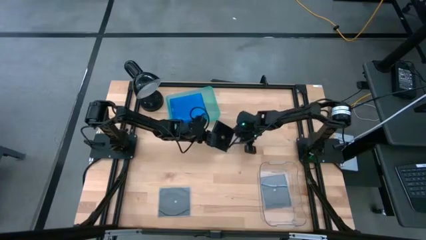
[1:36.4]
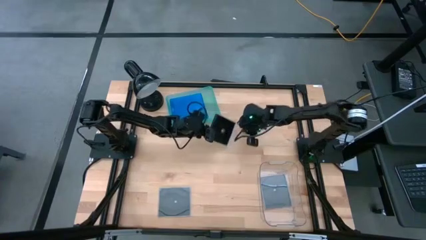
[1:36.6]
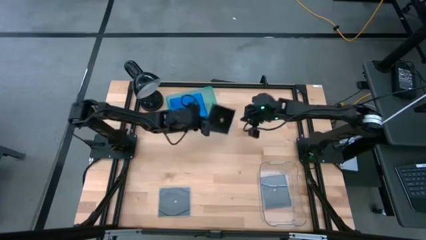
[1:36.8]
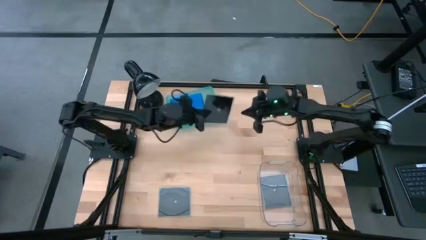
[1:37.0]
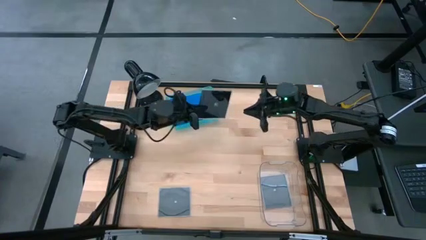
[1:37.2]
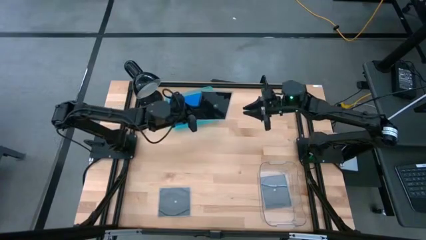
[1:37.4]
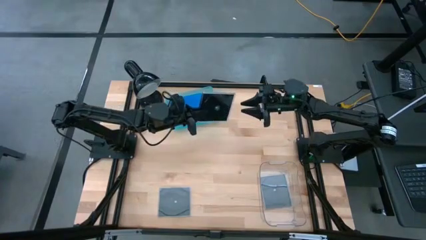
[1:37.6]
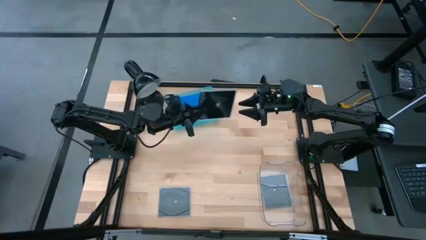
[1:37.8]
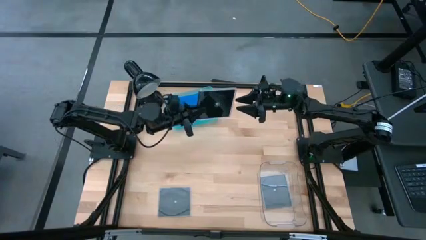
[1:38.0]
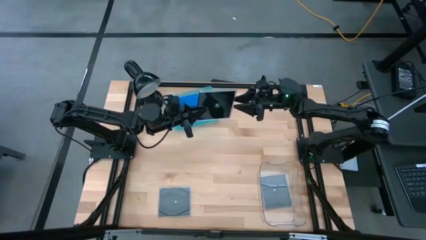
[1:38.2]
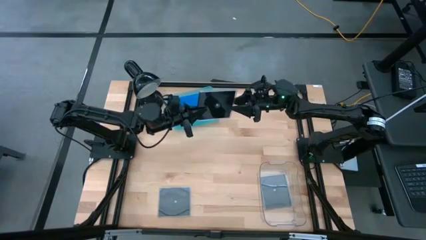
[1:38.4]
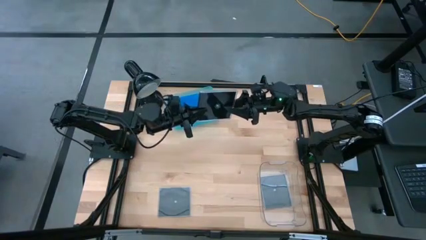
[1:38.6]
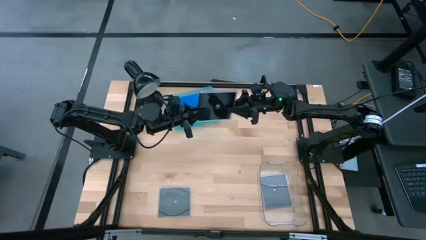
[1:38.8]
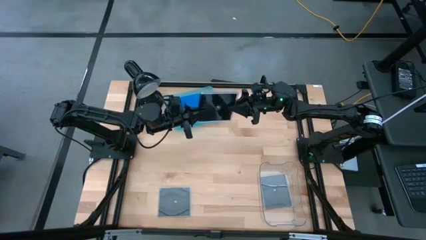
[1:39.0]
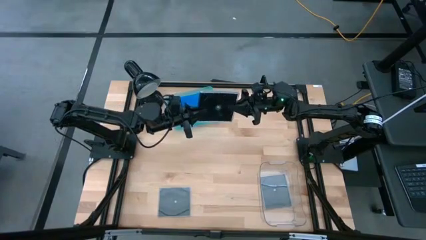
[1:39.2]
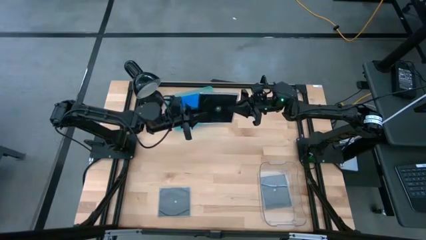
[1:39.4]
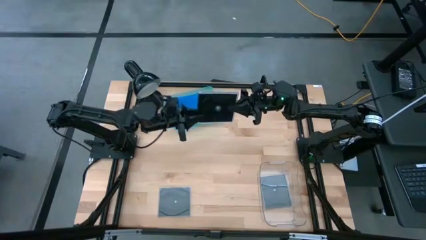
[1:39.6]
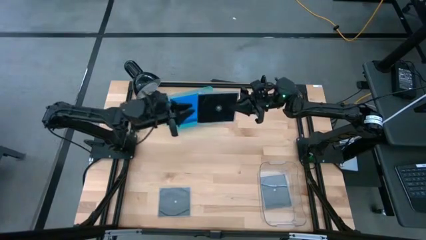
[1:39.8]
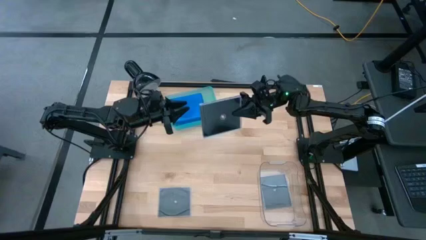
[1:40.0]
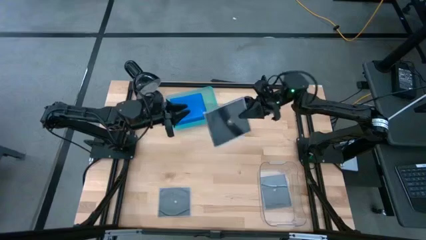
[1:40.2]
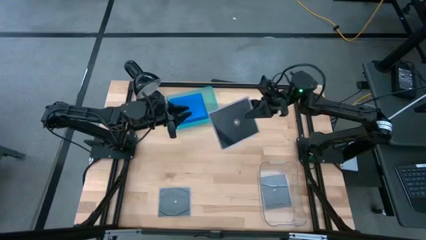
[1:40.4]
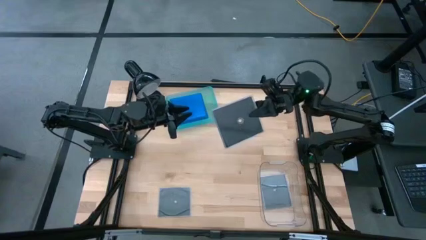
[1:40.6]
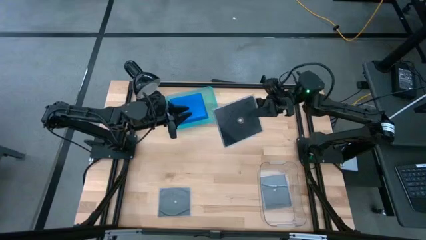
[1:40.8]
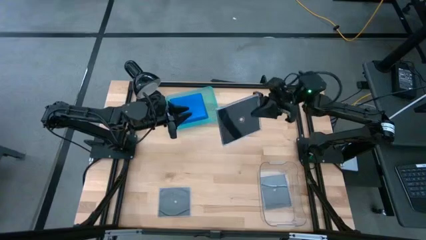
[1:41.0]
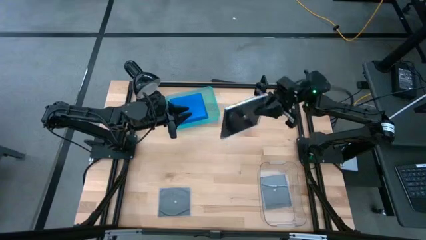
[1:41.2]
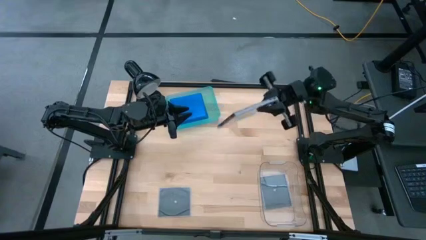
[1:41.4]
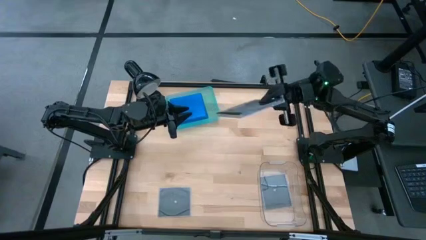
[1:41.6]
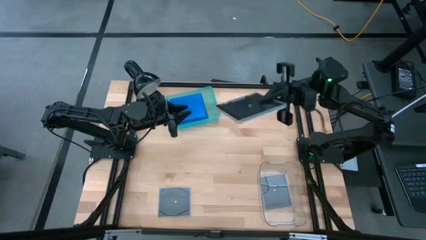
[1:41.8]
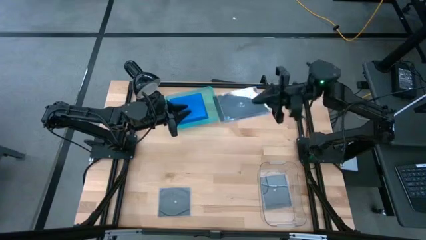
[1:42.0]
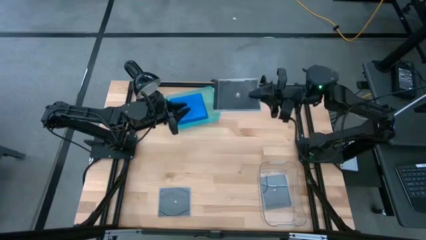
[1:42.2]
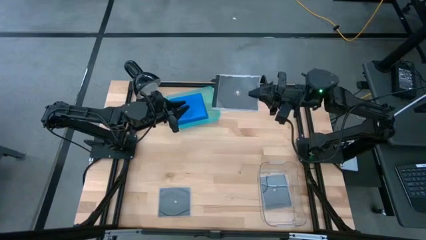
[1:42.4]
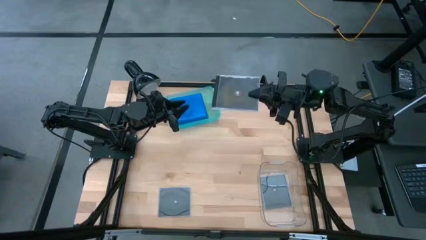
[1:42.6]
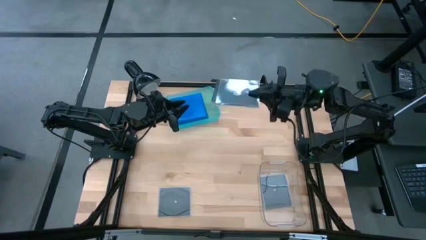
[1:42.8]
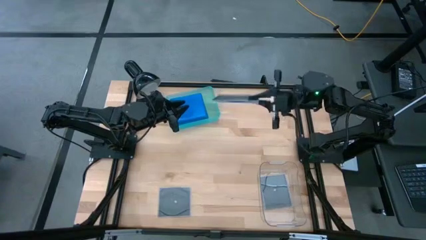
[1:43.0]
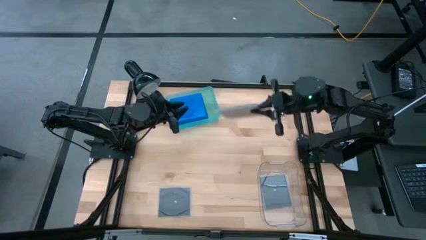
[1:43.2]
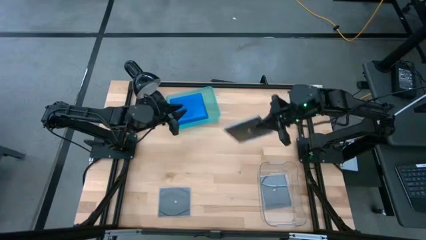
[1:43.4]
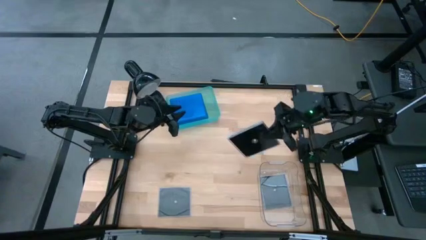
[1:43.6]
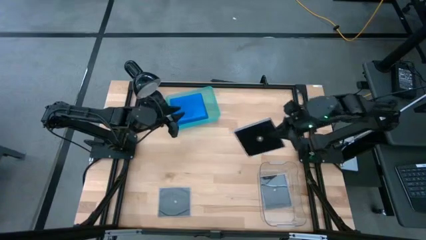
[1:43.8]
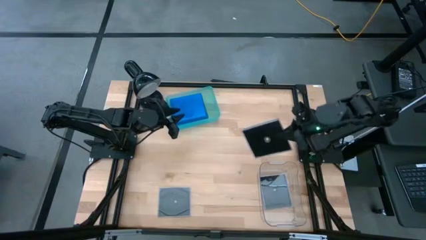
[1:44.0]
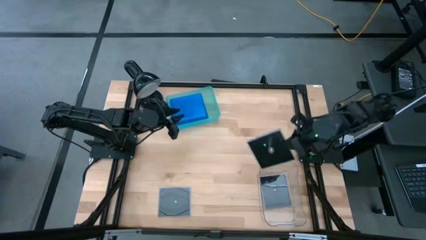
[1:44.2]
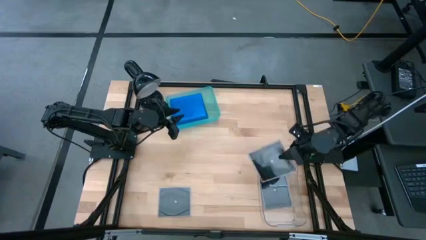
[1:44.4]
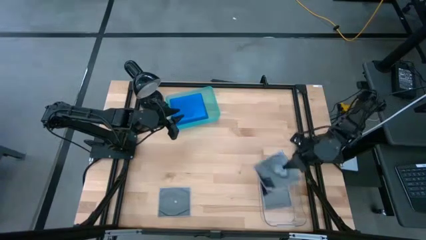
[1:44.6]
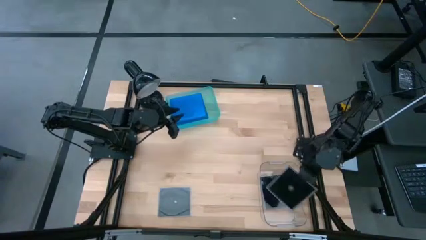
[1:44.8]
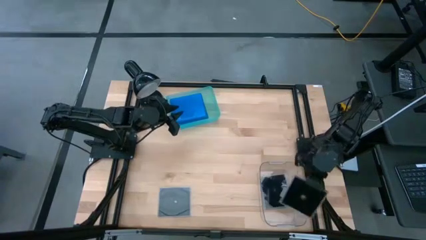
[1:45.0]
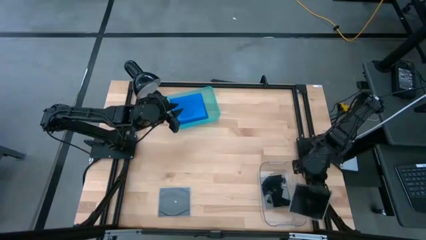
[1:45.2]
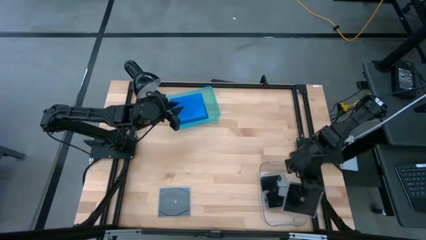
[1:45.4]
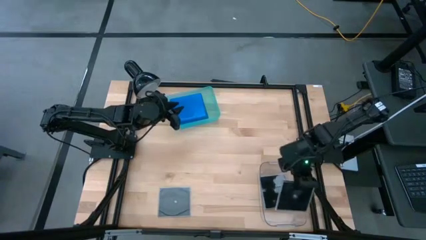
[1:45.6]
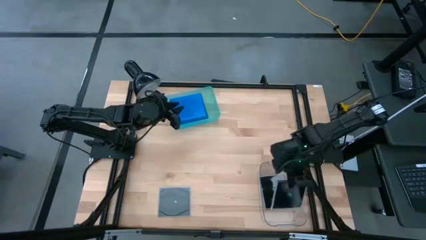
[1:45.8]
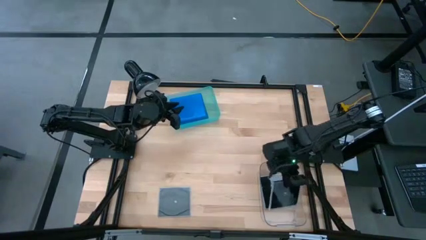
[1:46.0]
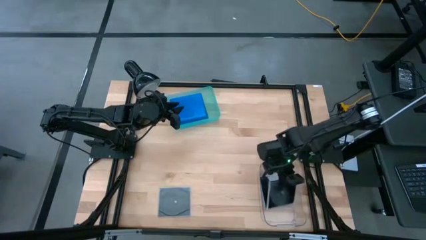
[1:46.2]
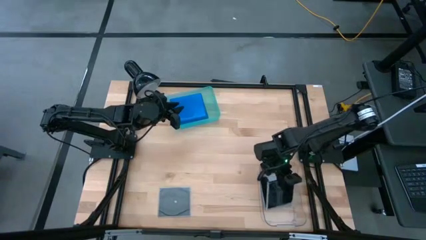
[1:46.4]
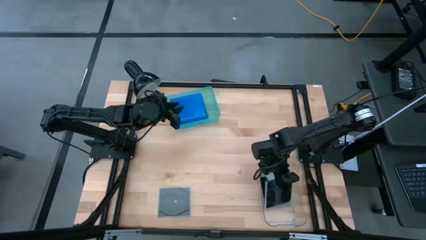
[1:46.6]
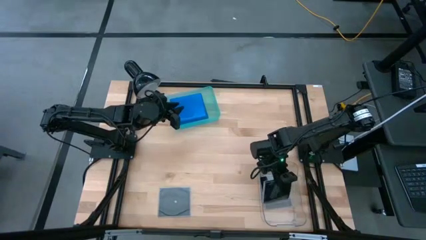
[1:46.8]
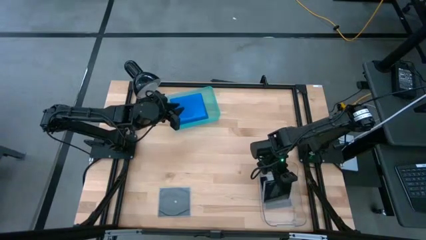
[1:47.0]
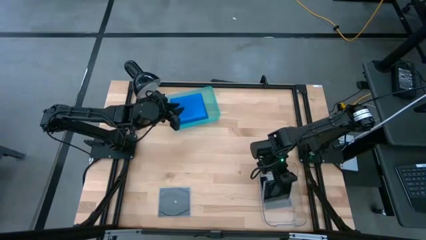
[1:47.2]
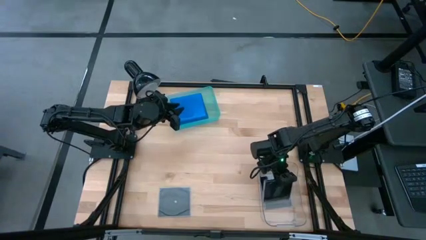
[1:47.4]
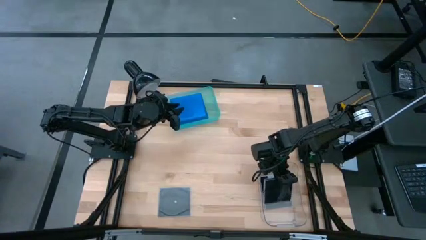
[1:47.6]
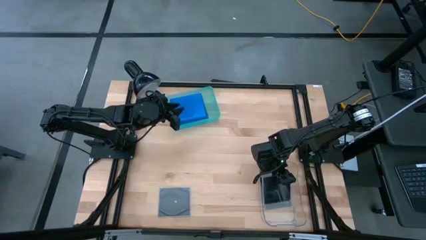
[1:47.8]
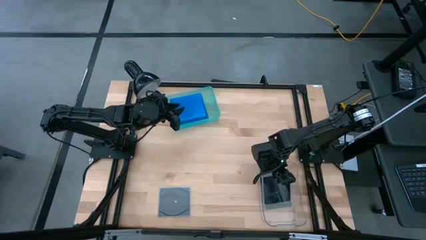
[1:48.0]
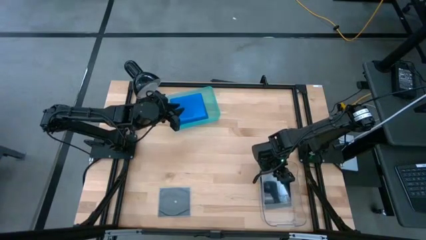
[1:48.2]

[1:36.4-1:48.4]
Task: Pick & place jewel cases by type
Put the right black CD case into the transparent bin

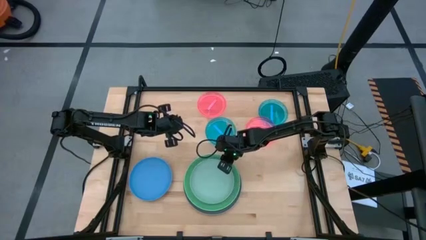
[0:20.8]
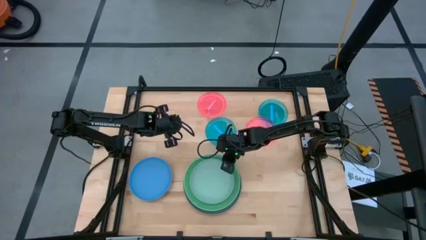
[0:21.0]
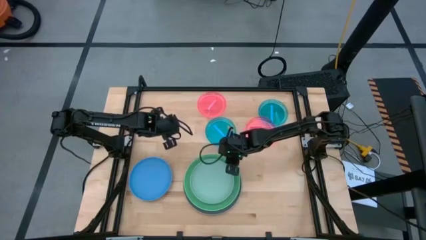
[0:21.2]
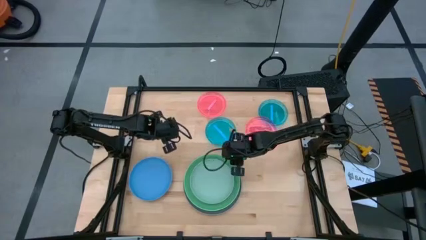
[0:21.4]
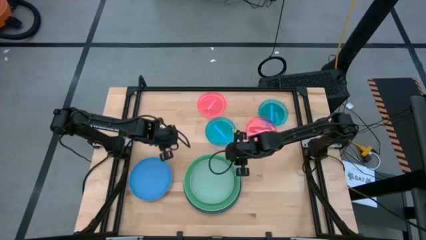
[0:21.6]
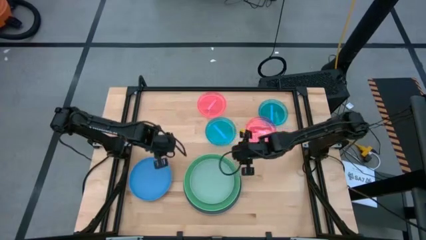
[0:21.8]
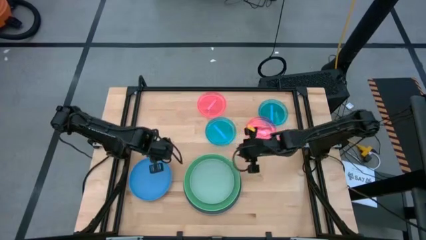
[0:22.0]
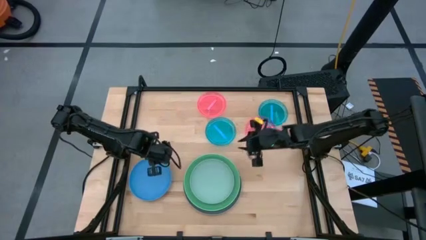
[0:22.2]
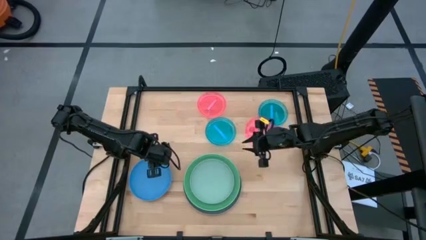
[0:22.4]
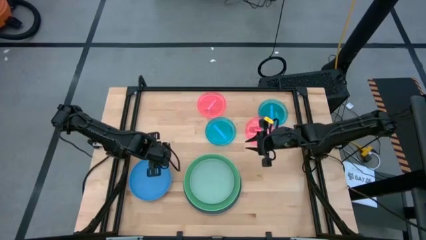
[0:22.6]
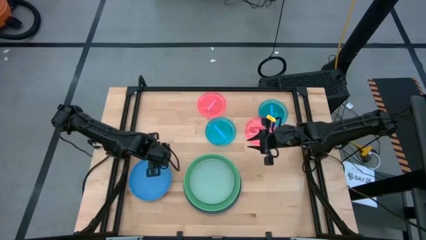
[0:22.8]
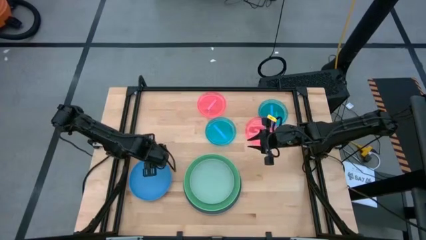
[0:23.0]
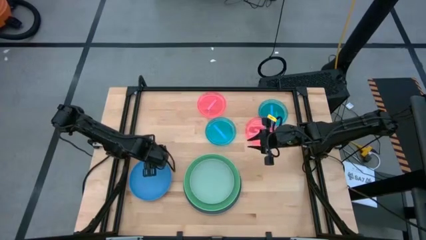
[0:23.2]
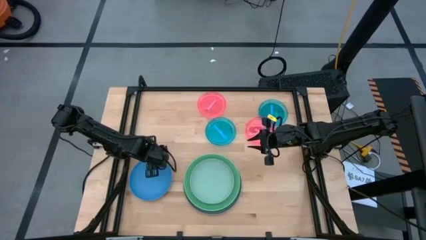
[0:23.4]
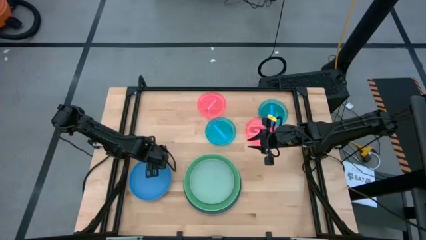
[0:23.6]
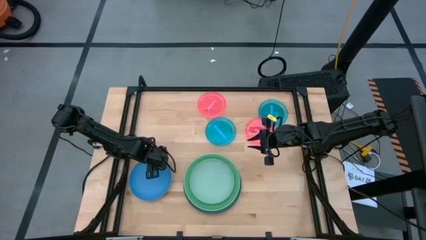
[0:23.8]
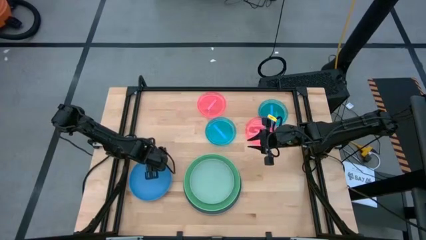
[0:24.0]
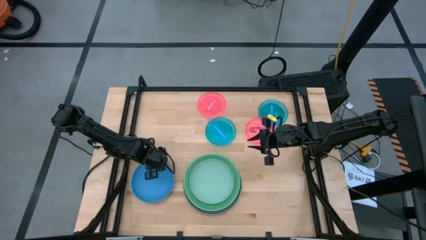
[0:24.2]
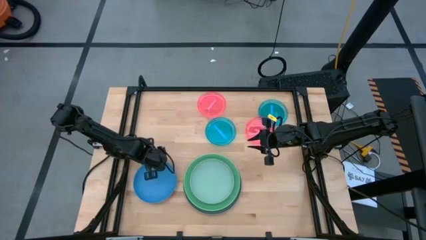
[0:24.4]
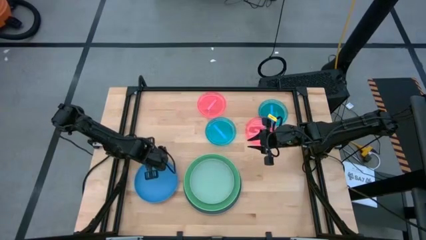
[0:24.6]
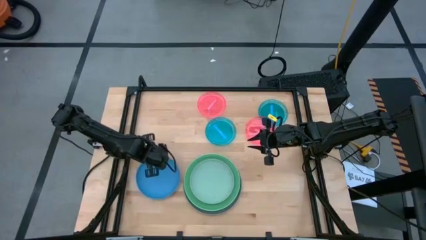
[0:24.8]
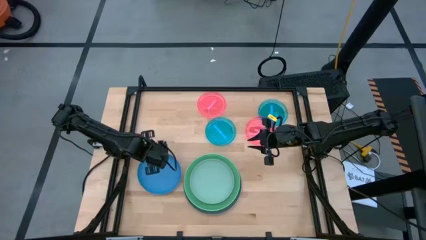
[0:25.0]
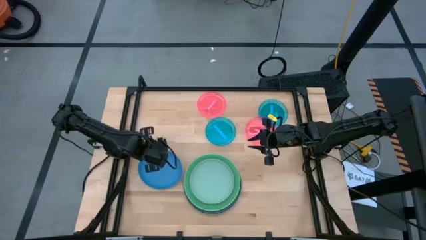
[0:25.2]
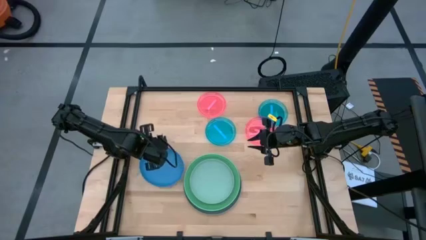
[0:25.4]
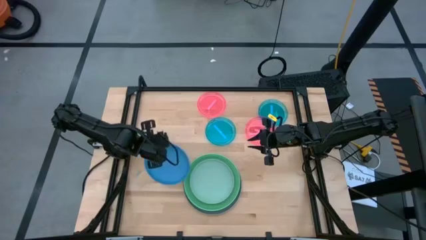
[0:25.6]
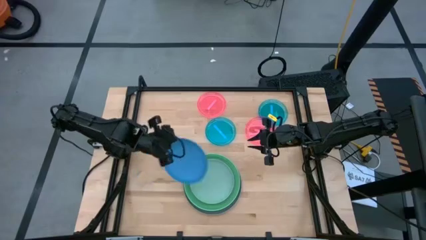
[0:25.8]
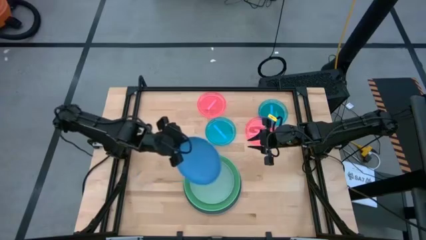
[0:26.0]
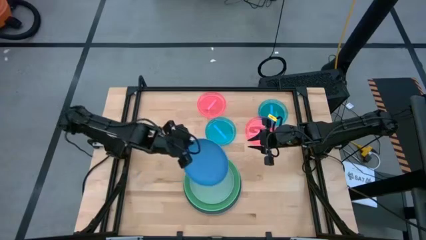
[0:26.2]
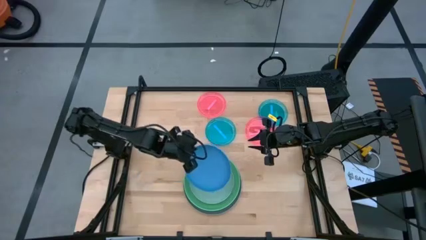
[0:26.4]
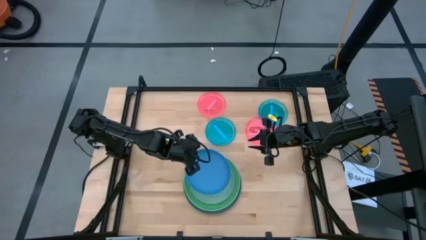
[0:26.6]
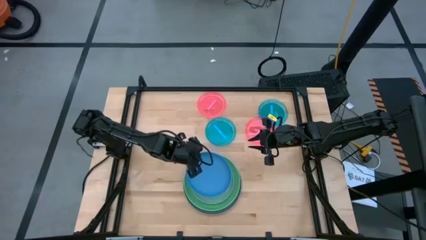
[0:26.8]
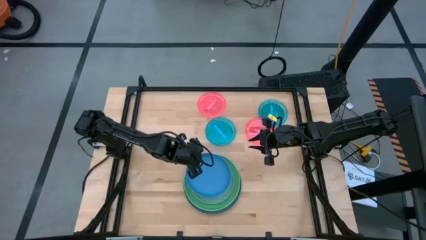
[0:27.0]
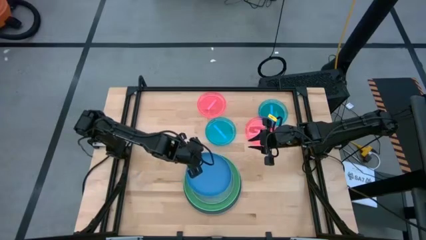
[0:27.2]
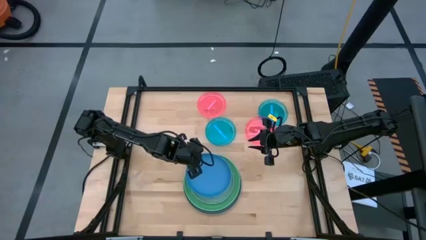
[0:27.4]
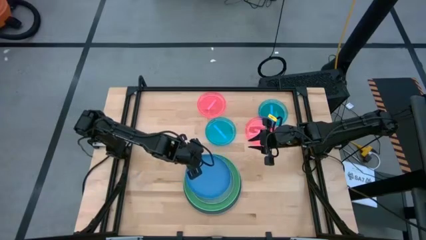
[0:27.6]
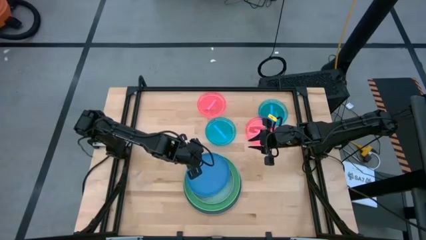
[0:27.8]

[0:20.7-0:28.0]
Task: Stack plastic plates
Stack the blue plate on top of the light blue plate
